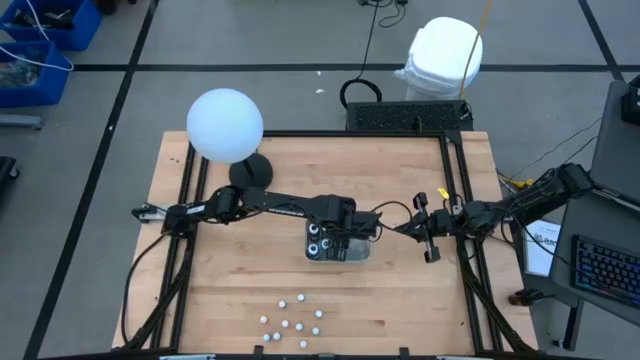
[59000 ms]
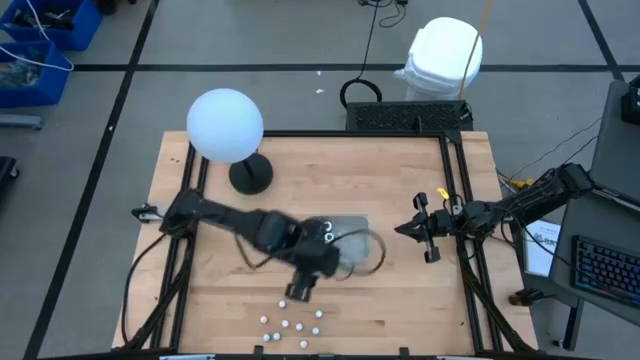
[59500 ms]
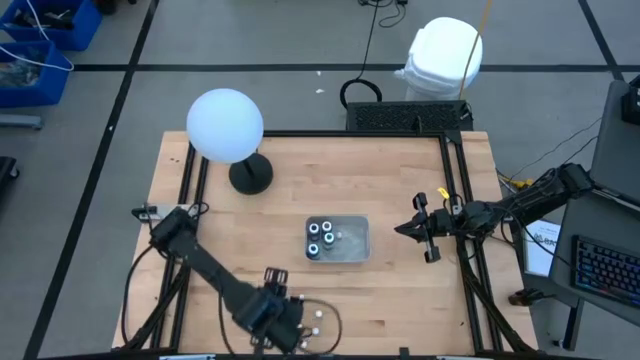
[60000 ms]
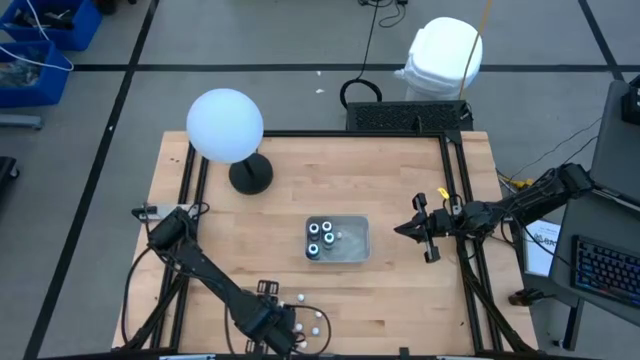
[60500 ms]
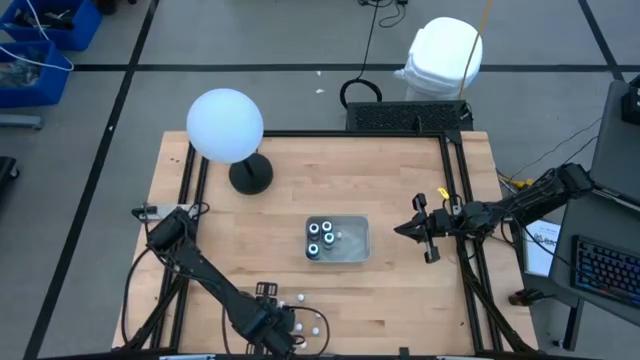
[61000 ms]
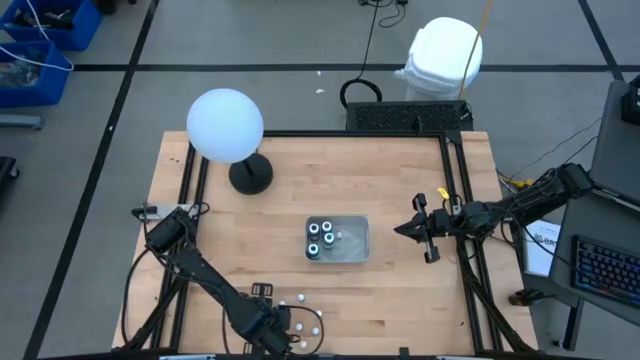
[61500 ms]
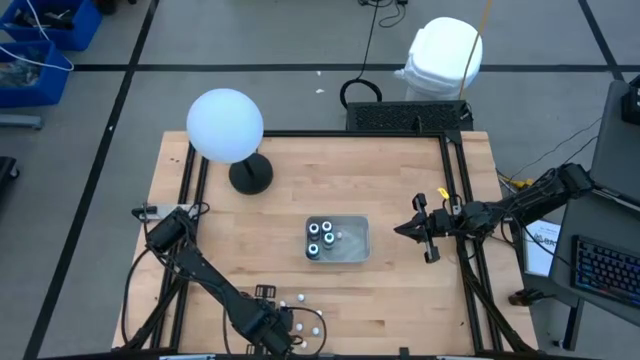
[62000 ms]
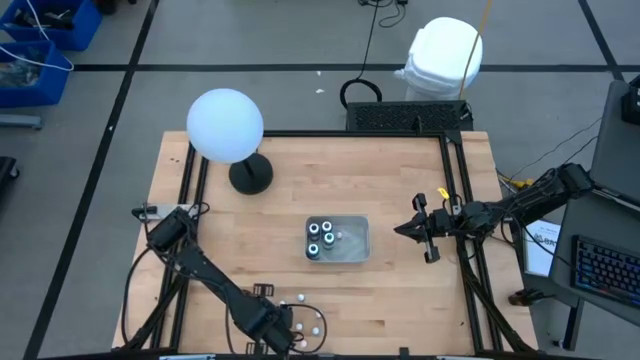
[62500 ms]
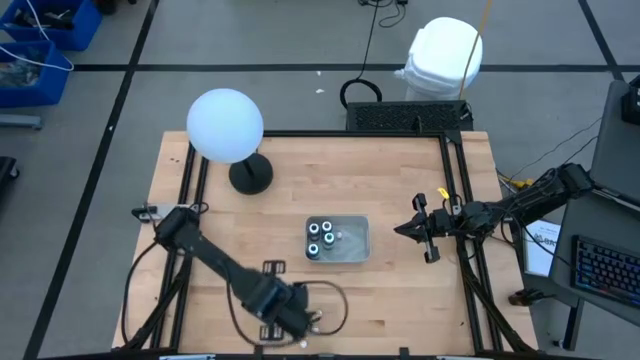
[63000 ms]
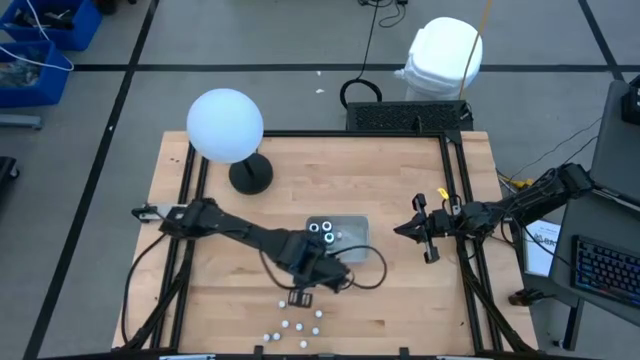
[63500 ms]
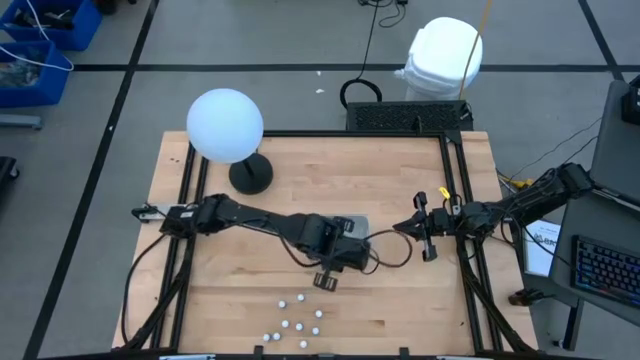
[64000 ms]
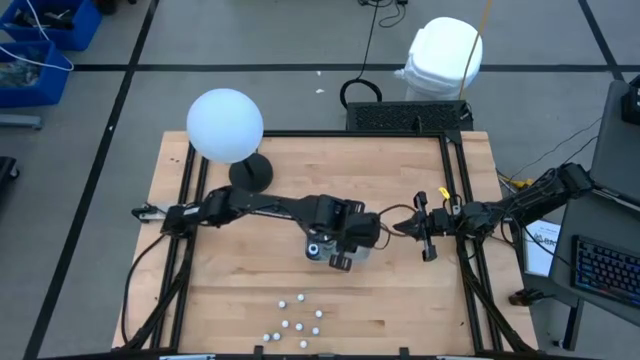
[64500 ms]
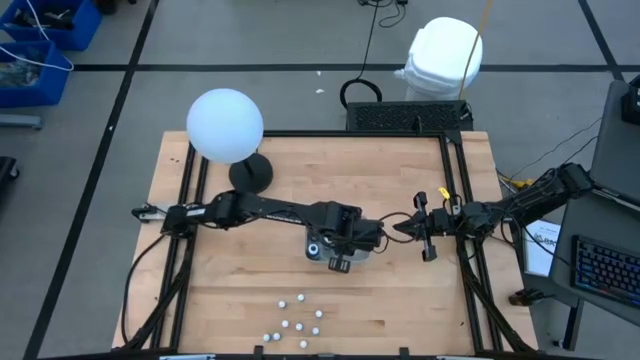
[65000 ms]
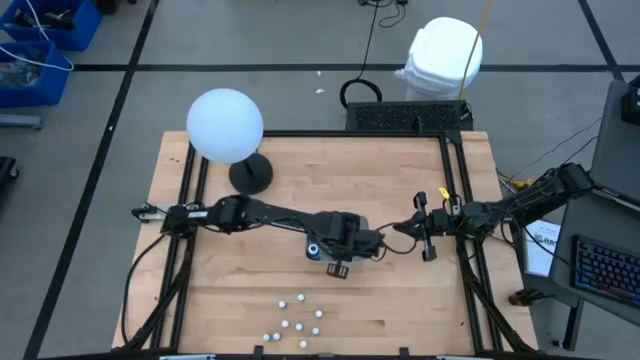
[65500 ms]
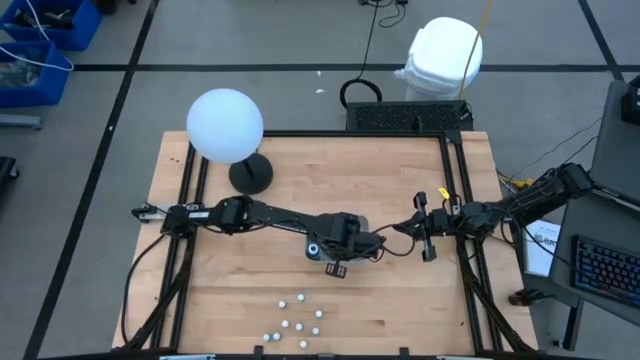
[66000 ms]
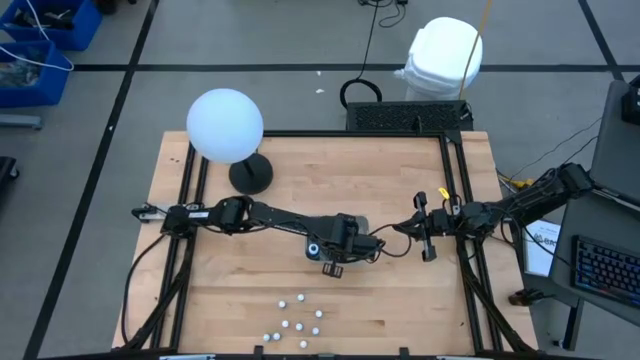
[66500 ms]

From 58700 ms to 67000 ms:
Task: Pick & Place food coloring
Put the small orange food coloring bottle into the gray bin

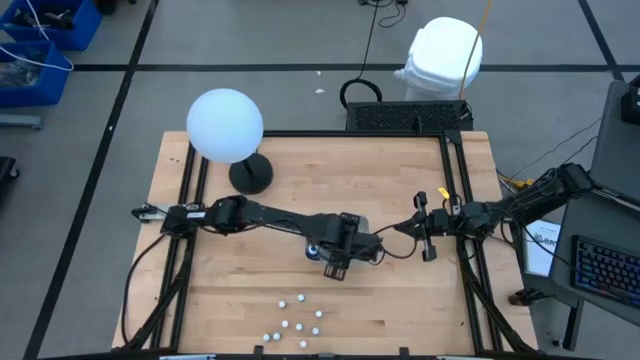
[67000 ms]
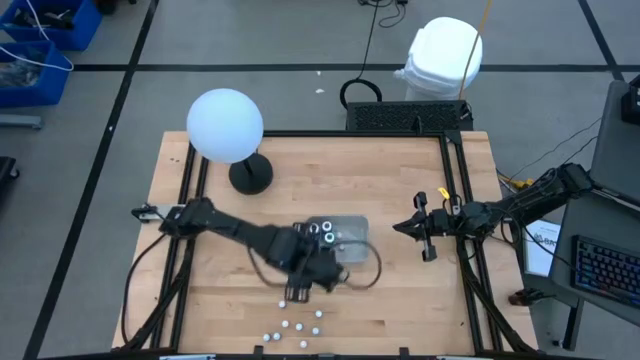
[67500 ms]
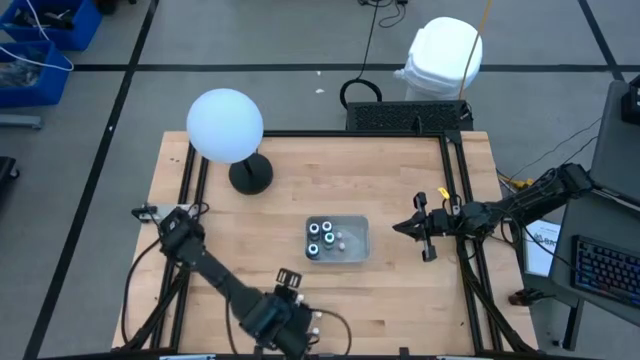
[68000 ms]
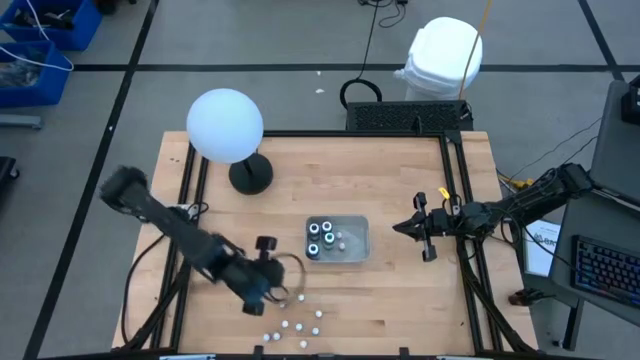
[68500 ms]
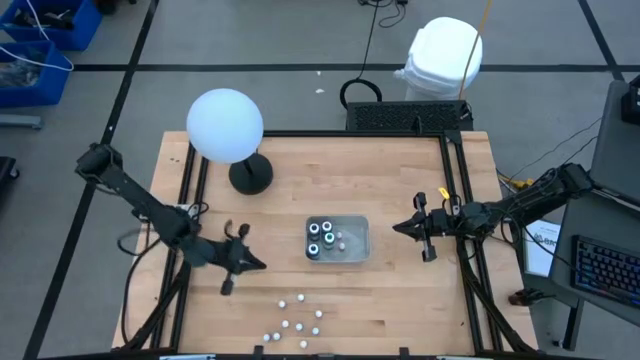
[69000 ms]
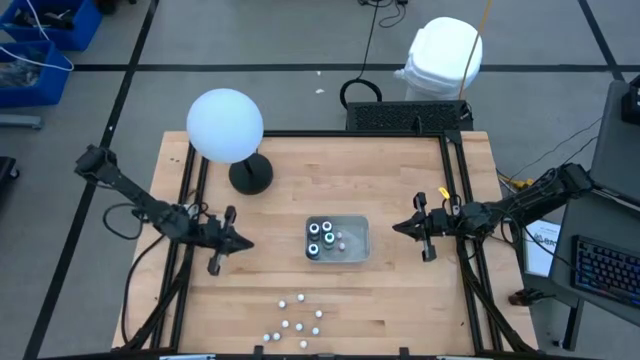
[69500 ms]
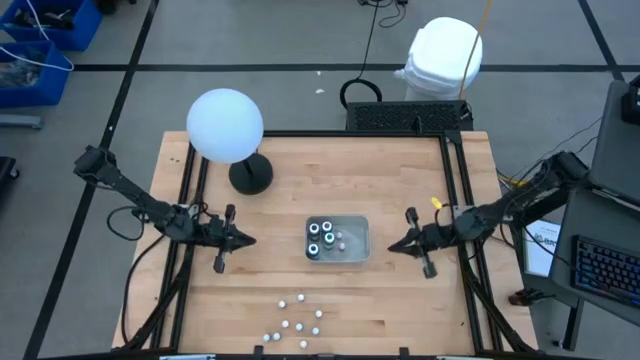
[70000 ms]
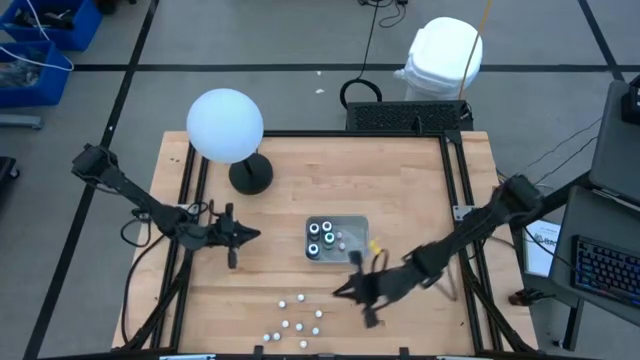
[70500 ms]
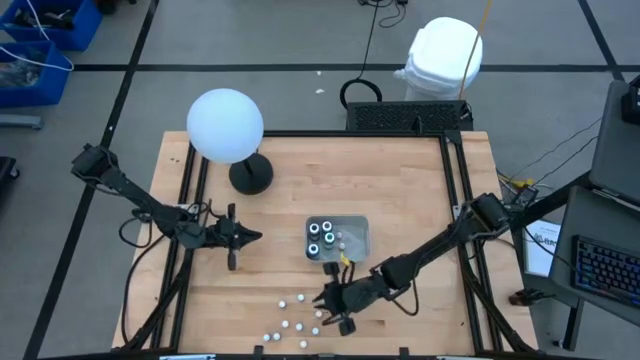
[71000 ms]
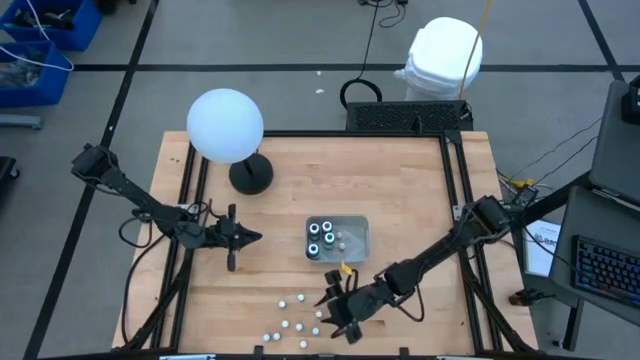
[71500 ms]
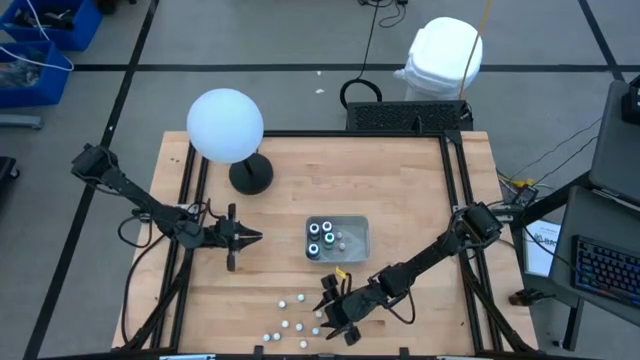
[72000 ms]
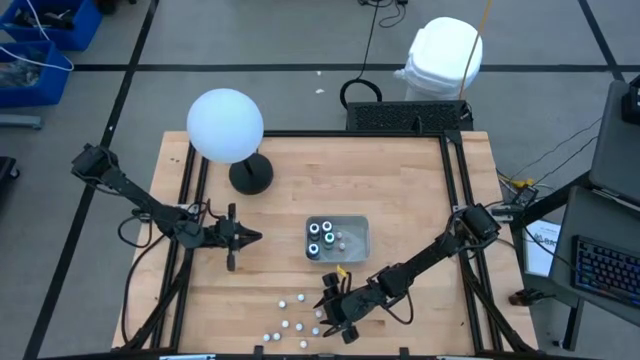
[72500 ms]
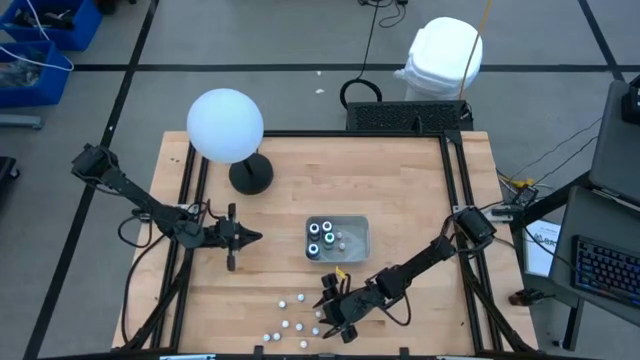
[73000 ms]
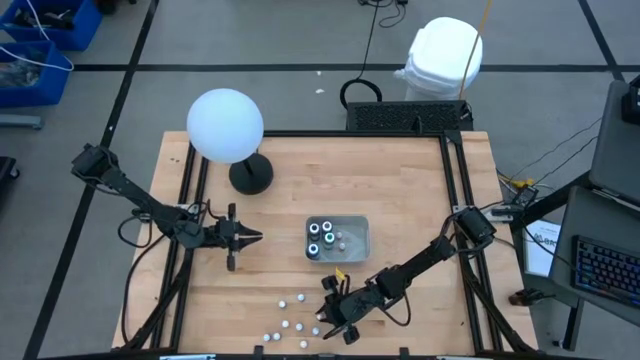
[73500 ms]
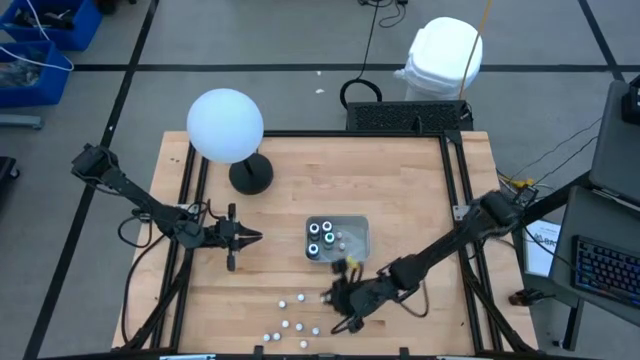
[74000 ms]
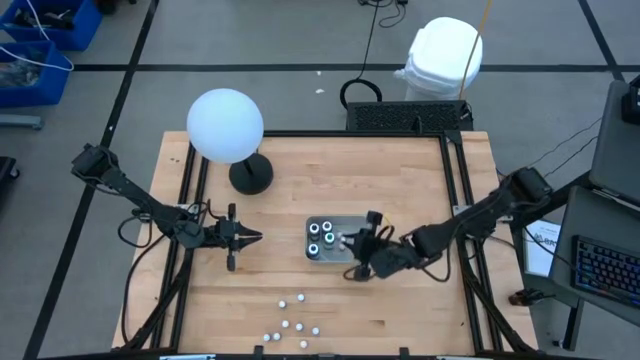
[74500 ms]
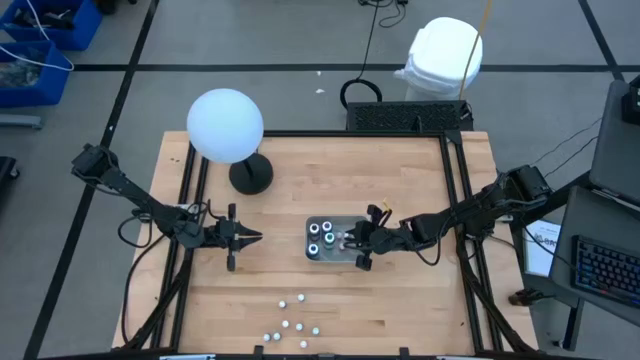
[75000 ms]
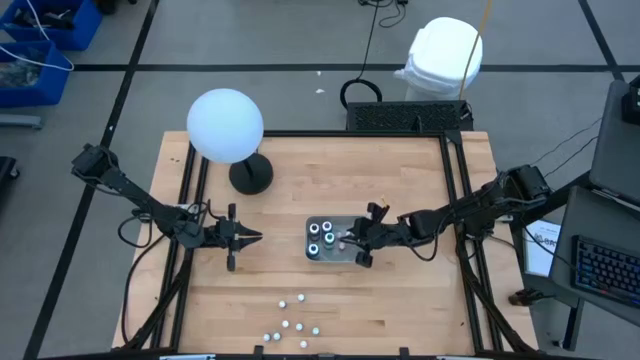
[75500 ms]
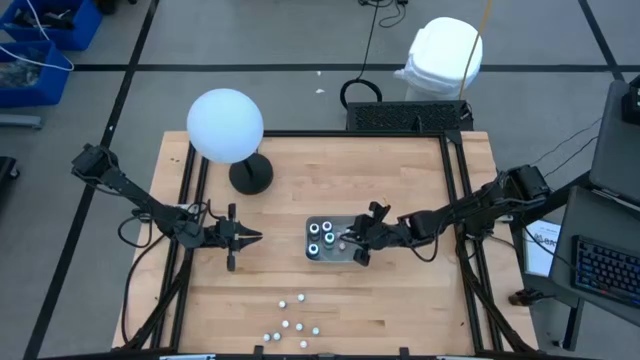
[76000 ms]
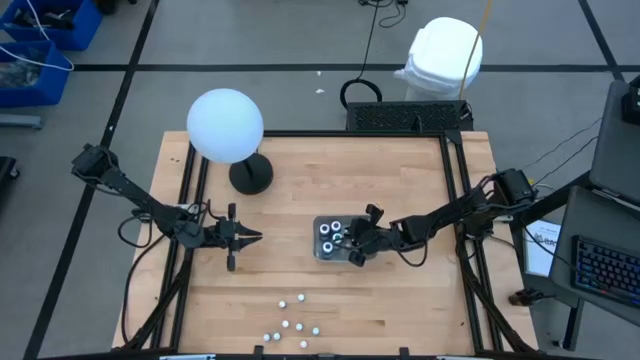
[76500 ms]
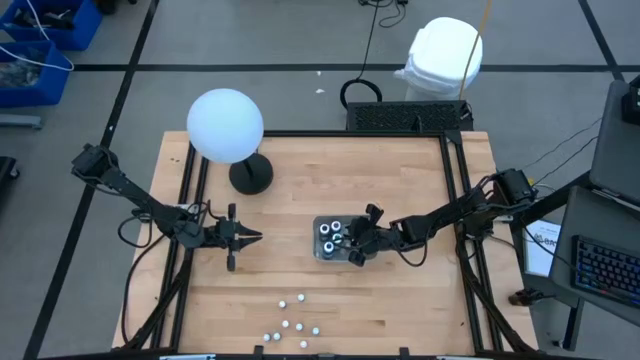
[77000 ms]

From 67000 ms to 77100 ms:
Put the small dark red food coloring bottle into the gray bin

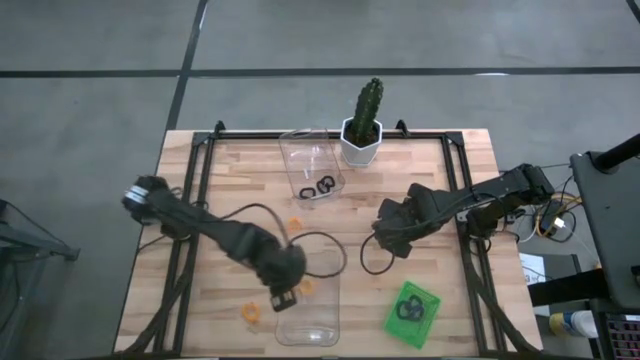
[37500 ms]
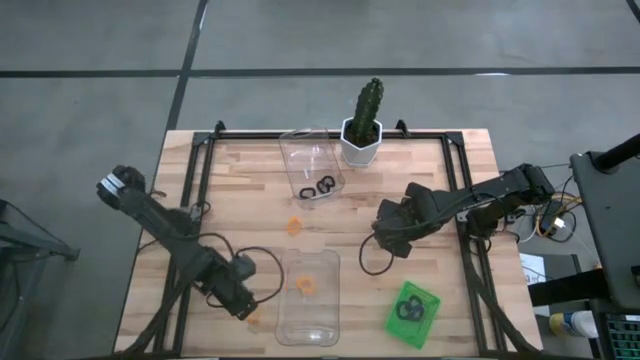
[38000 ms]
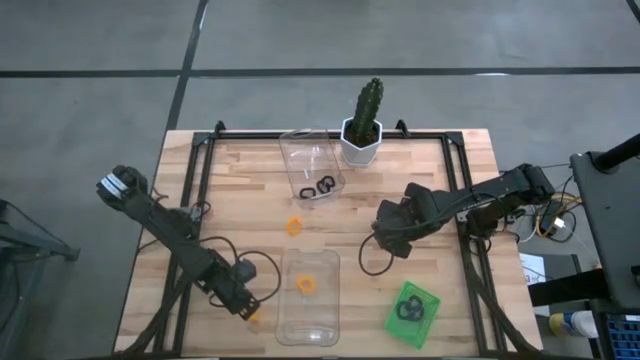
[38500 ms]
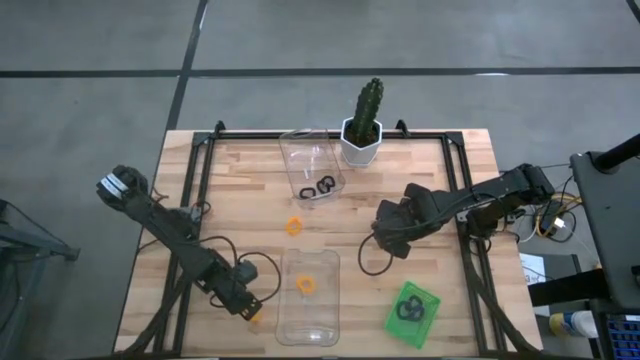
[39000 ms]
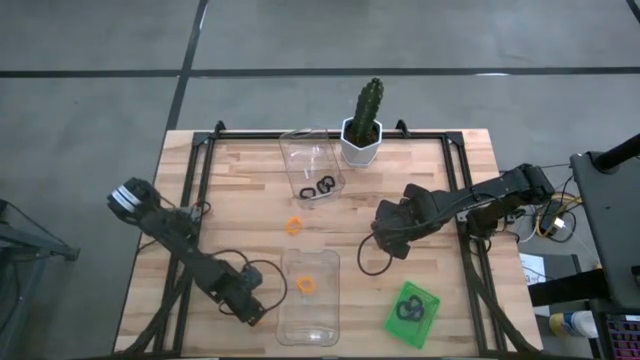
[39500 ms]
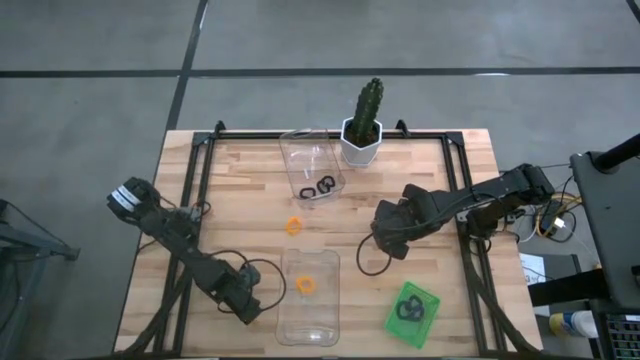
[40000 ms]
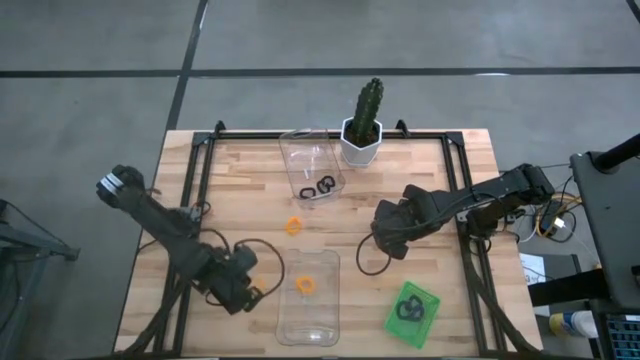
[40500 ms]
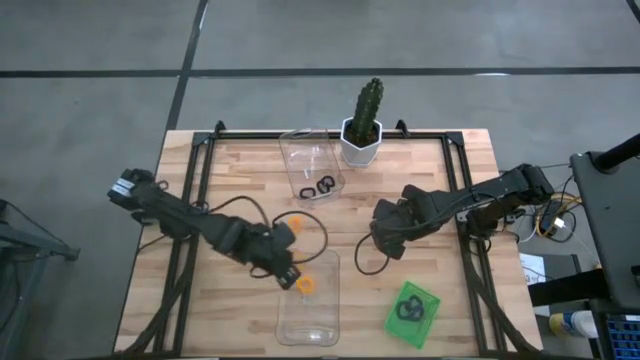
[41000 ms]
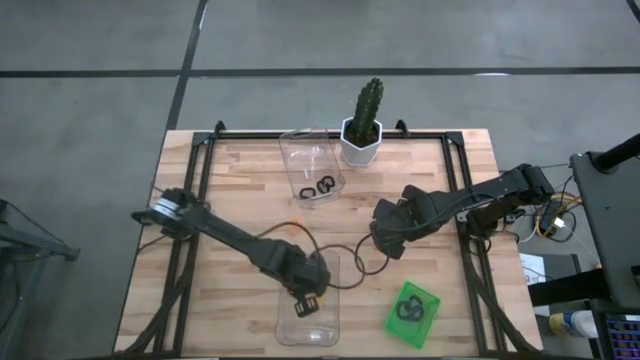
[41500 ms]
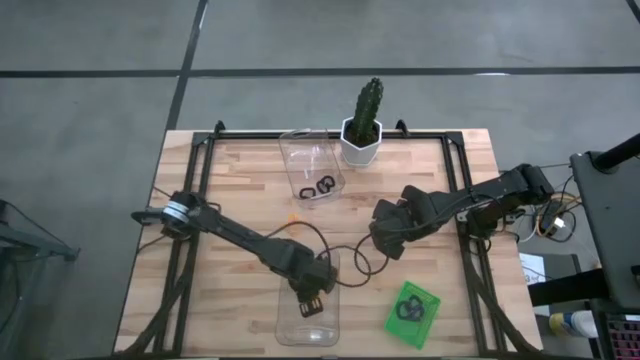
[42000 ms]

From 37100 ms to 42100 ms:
Task: Sort spring keychains
Put the bottom yellow spring keychain into the bottom transparent bin
